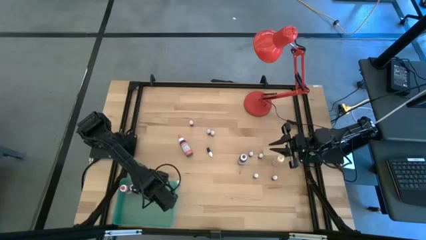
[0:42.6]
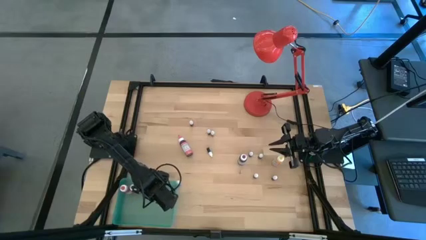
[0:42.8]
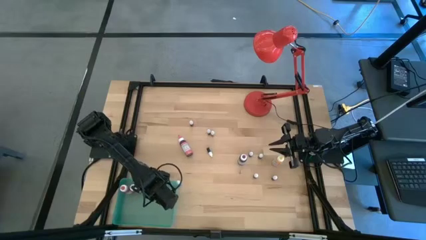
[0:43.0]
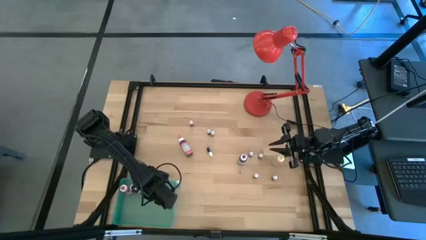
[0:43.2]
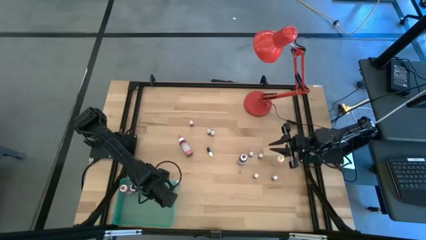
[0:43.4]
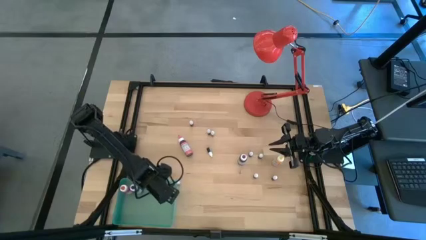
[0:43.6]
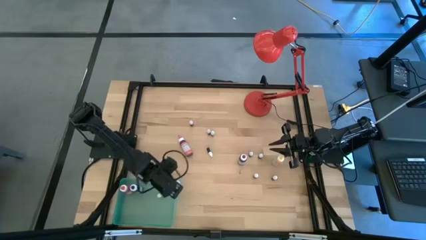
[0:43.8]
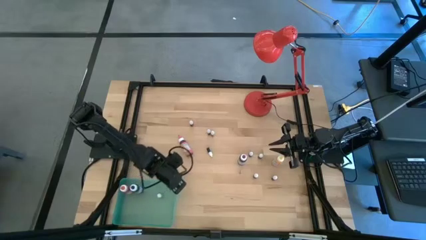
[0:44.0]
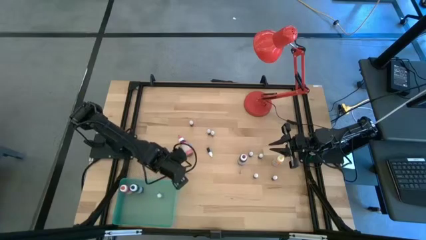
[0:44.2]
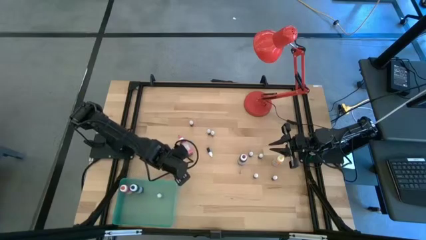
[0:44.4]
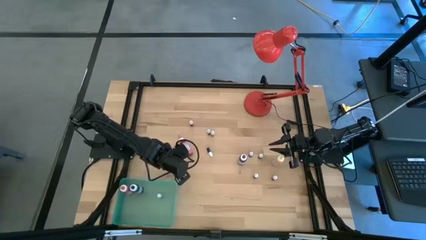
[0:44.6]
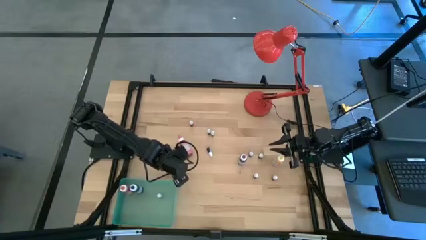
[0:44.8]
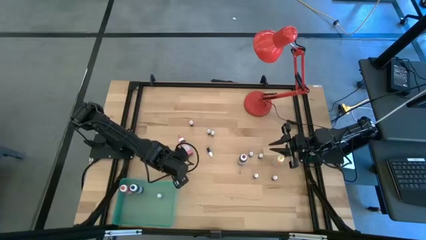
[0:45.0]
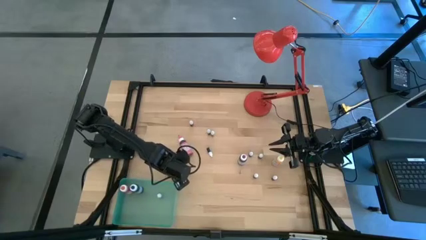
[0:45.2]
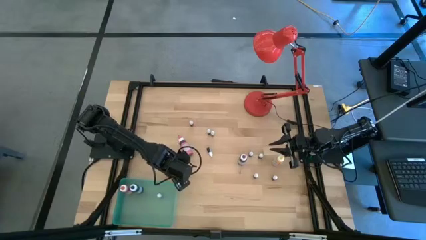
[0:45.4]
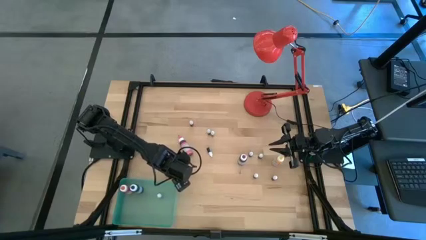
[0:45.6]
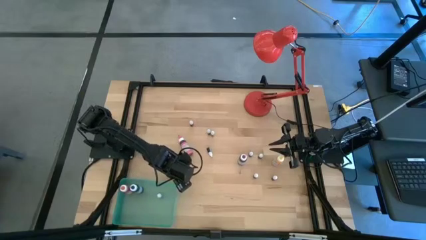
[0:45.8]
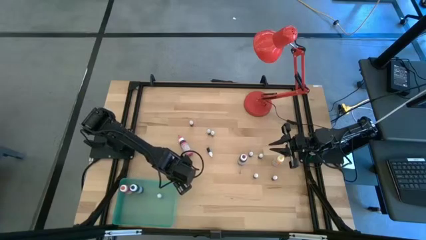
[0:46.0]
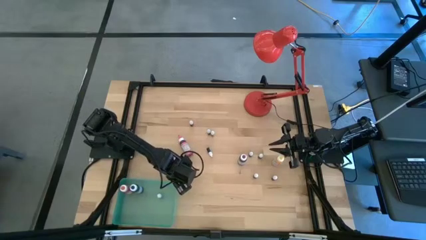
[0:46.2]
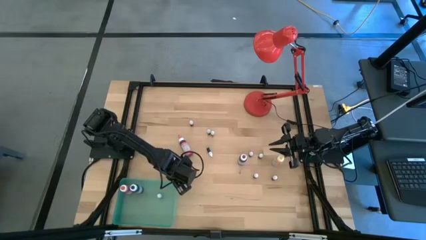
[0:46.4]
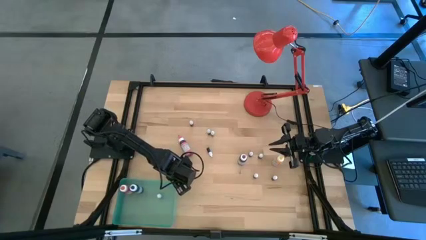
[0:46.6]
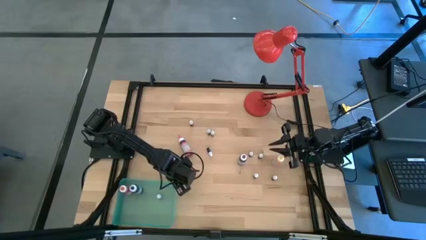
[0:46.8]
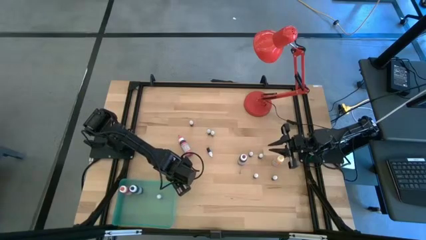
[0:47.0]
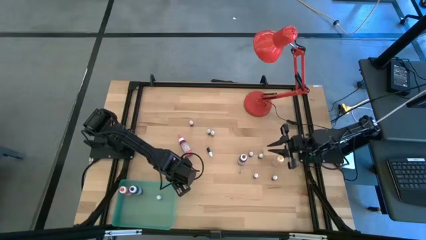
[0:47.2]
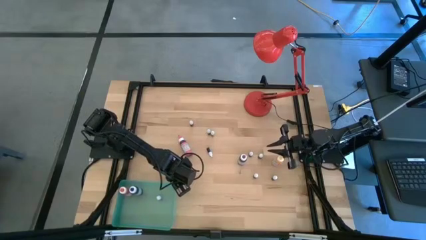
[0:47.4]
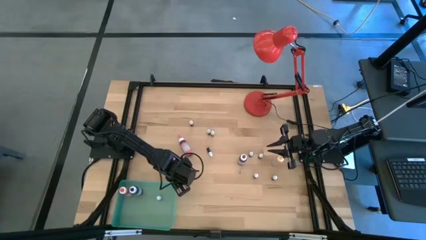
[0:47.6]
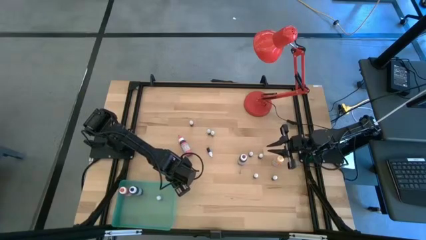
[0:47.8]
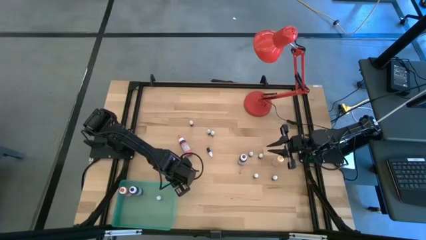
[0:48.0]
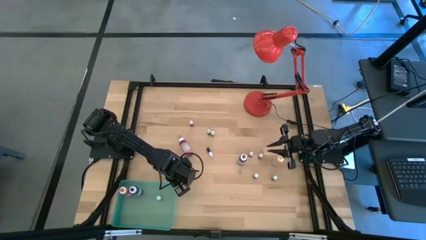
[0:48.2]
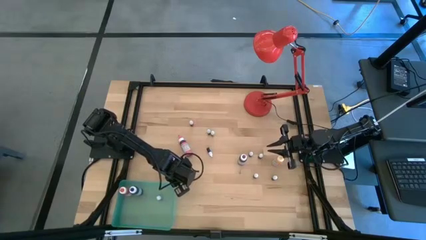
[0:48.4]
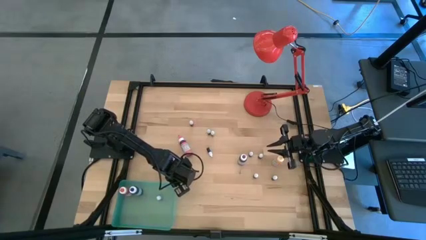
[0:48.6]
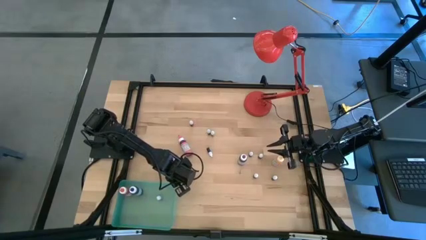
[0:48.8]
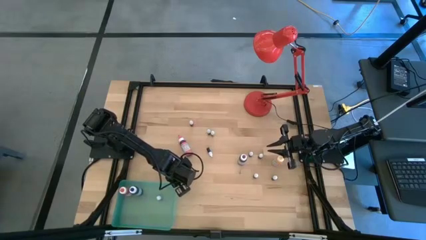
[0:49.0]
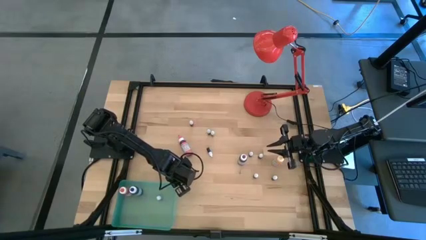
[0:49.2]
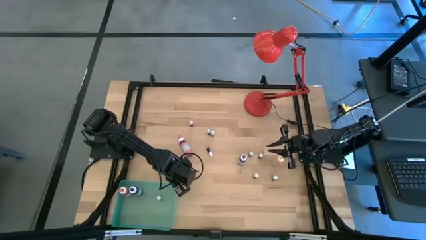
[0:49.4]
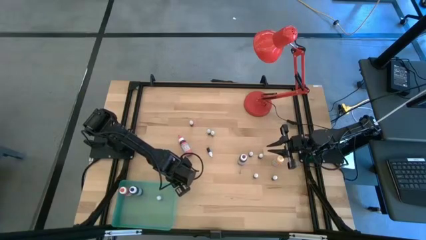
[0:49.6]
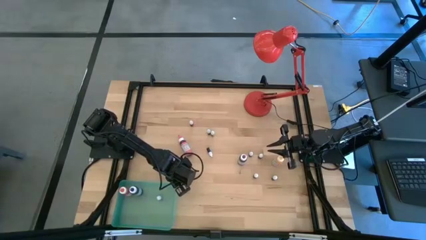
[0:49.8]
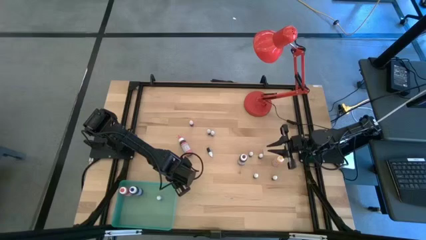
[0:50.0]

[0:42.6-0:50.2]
Task: Pick & Place food coloring
Put the blue food coloring into the blue bin

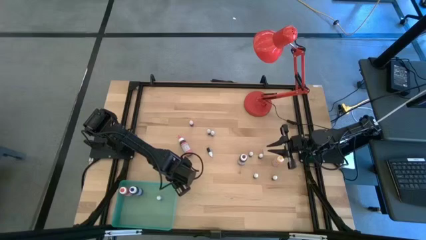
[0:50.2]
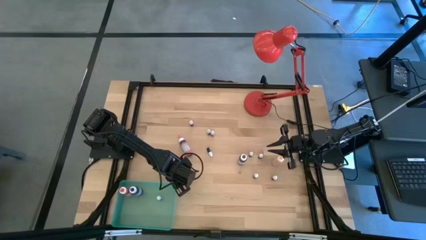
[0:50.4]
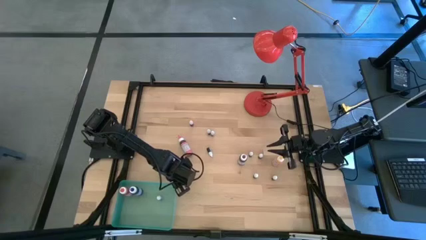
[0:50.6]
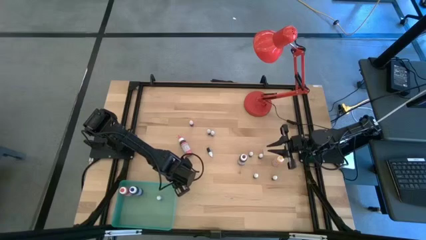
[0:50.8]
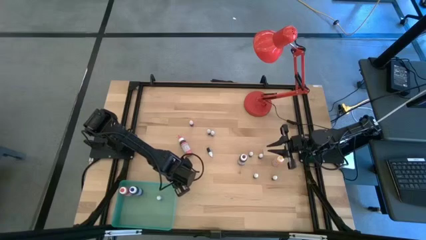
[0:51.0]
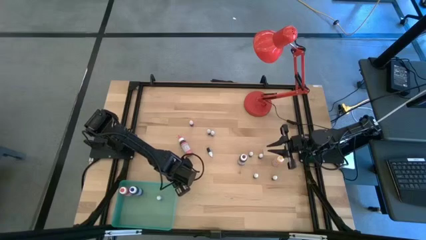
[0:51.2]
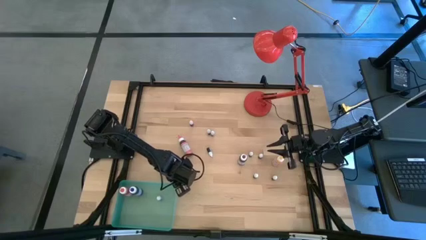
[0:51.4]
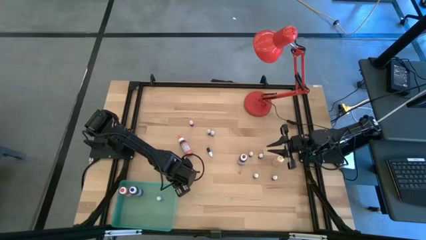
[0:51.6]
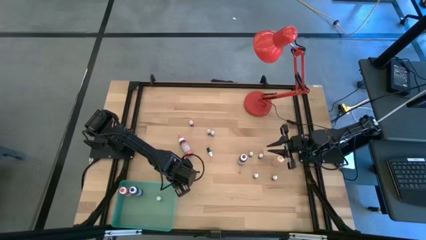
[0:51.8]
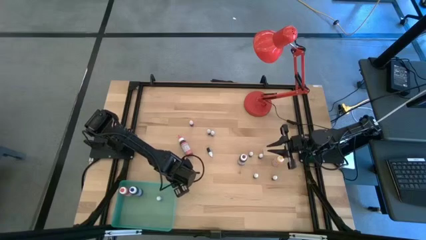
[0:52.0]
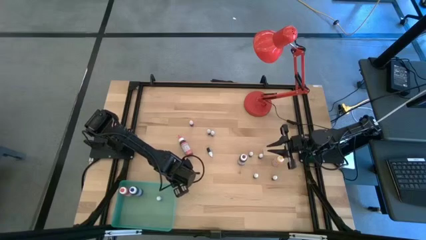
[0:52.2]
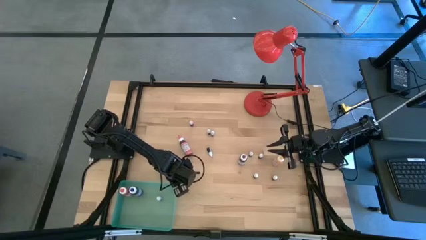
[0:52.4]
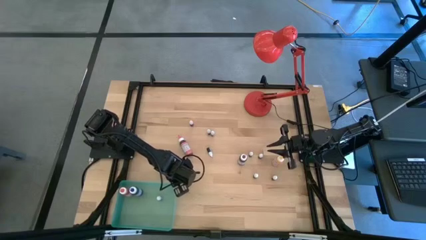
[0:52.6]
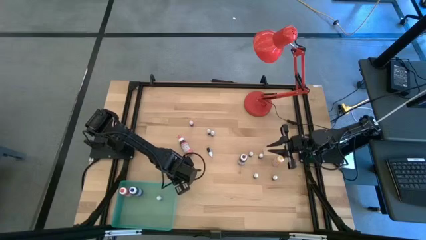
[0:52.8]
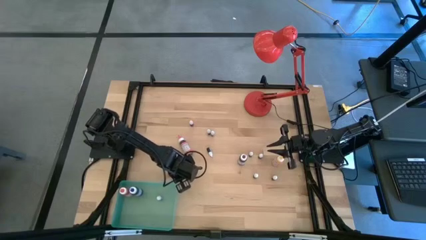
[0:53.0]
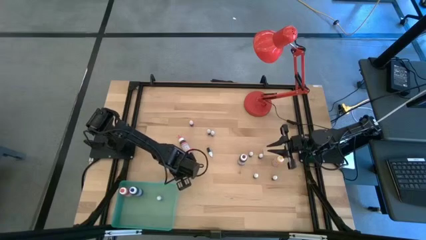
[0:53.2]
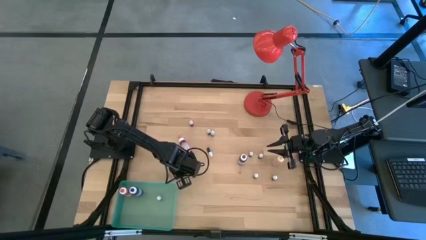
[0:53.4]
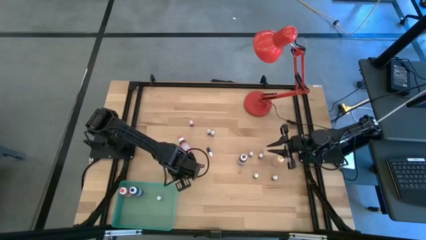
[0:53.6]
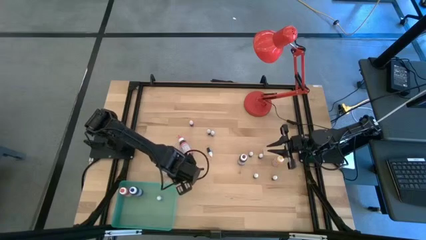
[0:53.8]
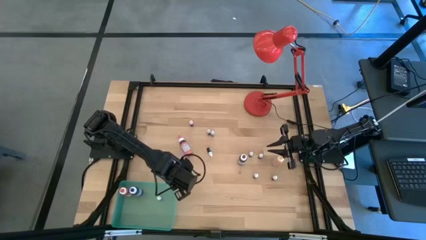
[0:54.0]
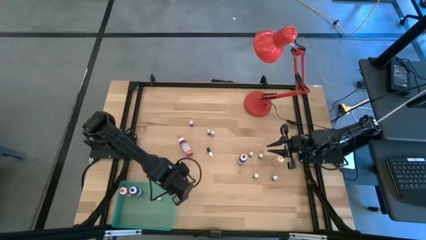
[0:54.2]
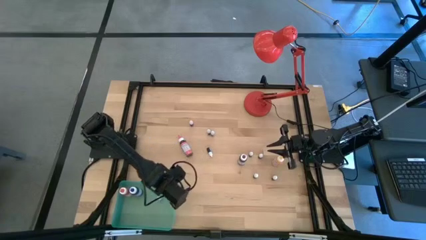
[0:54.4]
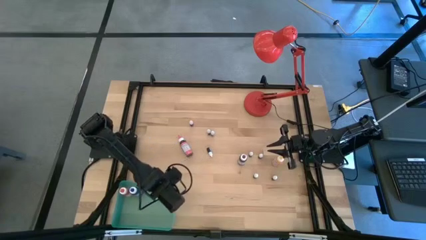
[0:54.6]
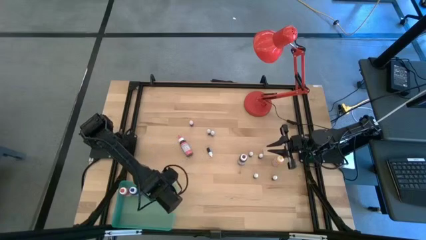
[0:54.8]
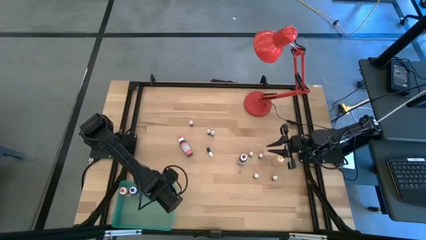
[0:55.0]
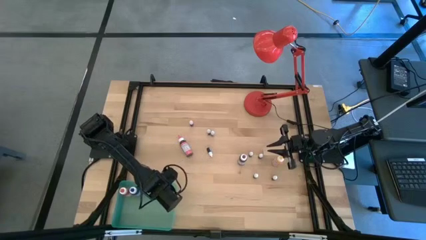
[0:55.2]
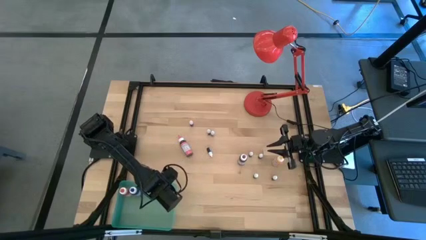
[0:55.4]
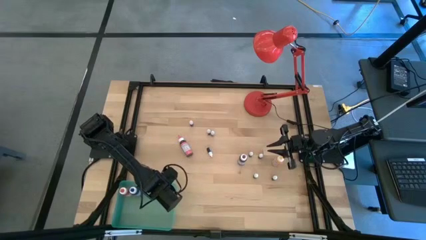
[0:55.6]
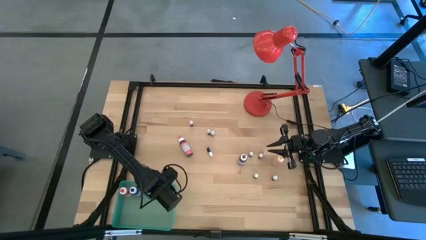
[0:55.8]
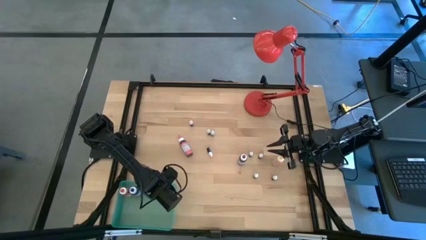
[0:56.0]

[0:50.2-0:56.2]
Put the blue food coloring into the blue bin
